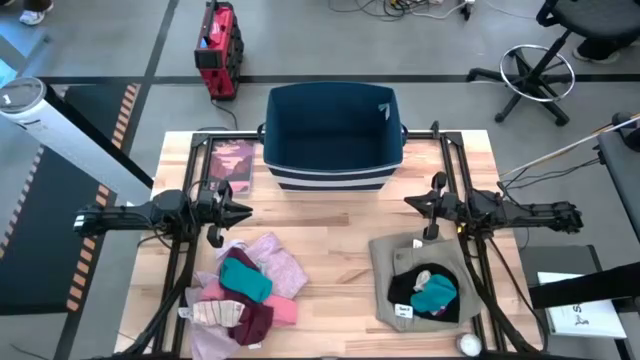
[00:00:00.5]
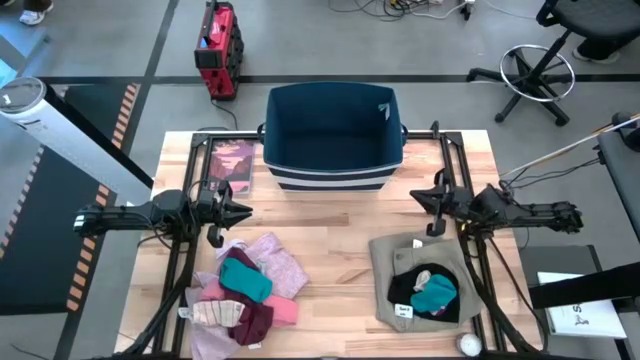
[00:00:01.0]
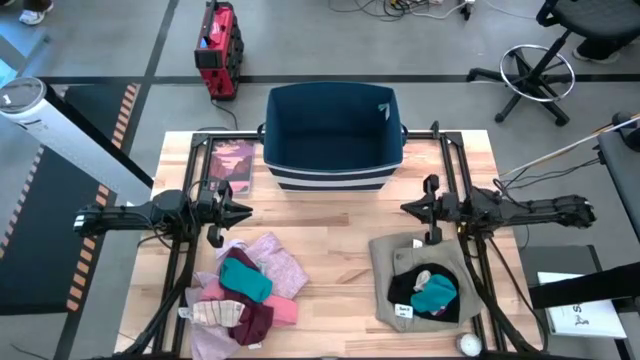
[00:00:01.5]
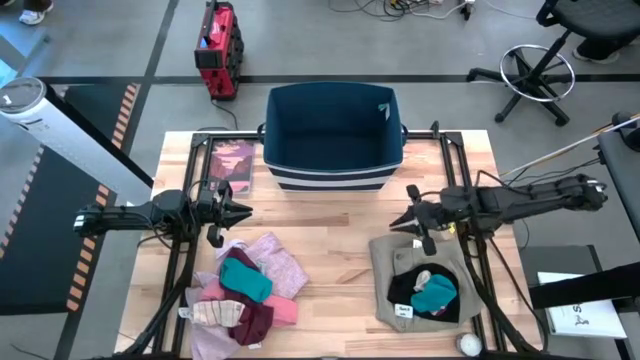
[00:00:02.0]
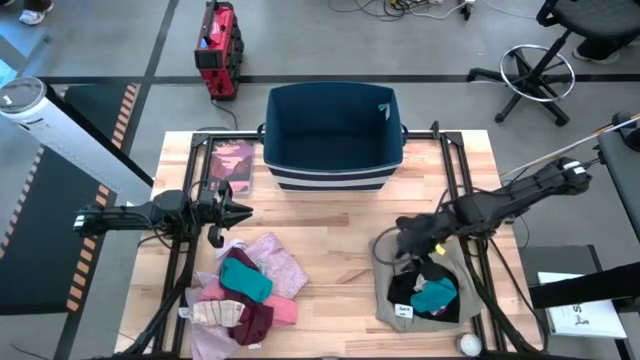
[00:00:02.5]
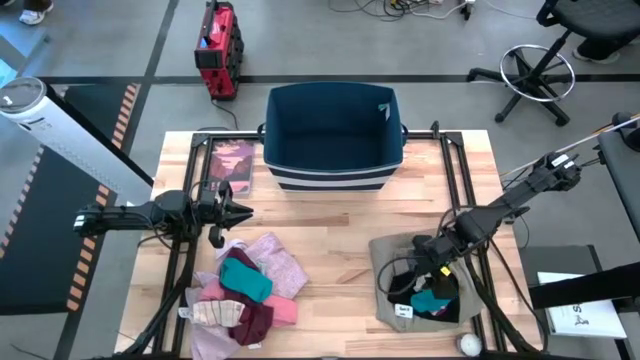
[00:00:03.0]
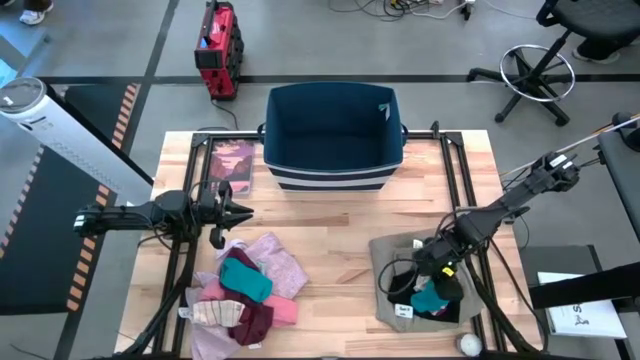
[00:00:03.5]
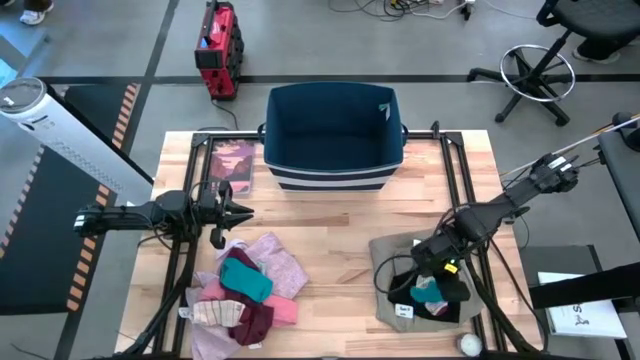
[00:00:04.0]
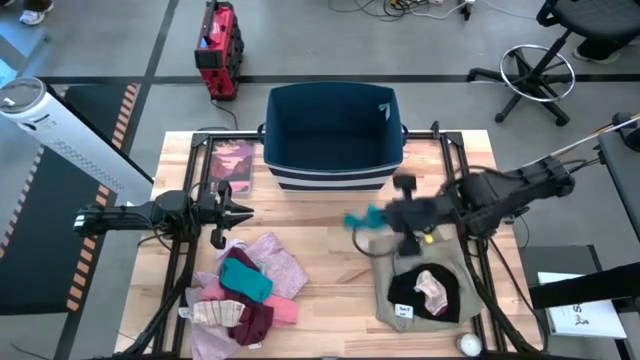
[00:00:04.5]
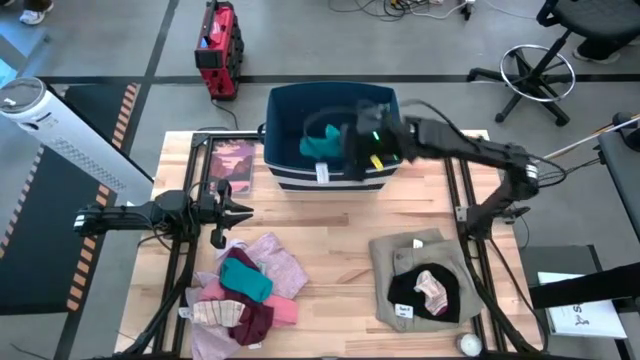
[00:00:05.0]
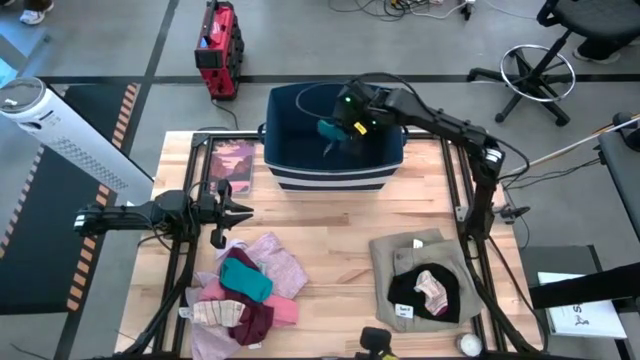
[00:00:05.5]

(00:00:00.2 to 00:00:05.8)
Task: Sort clothes
Put the right blue sock into the blue laundry bin

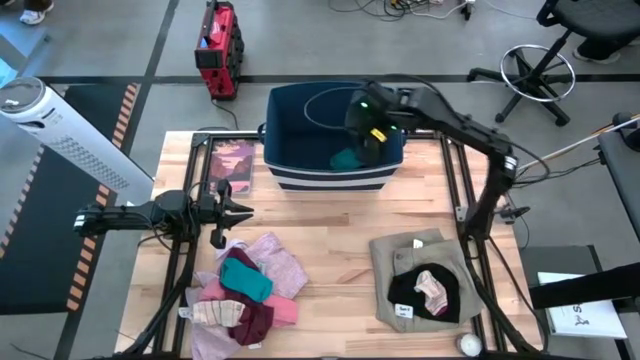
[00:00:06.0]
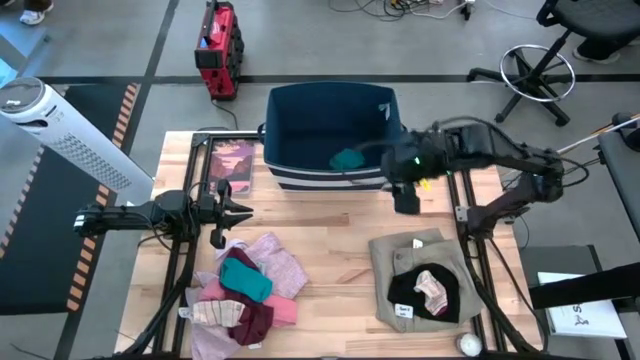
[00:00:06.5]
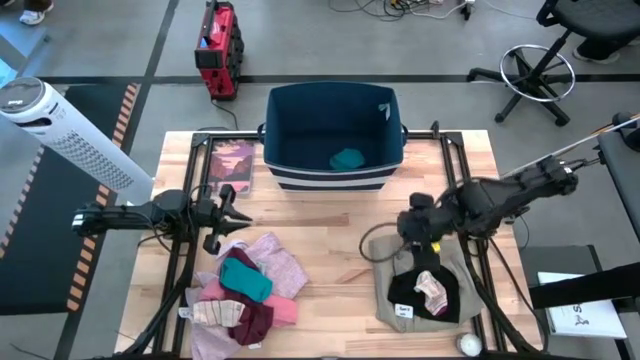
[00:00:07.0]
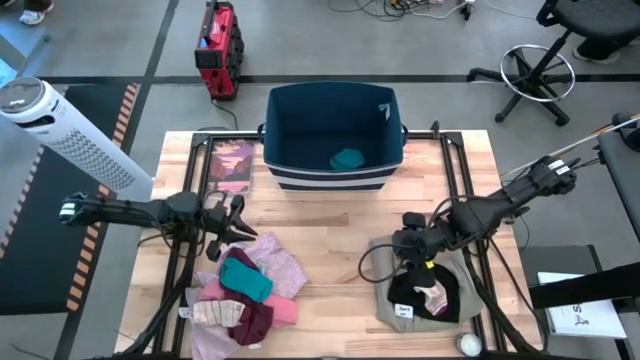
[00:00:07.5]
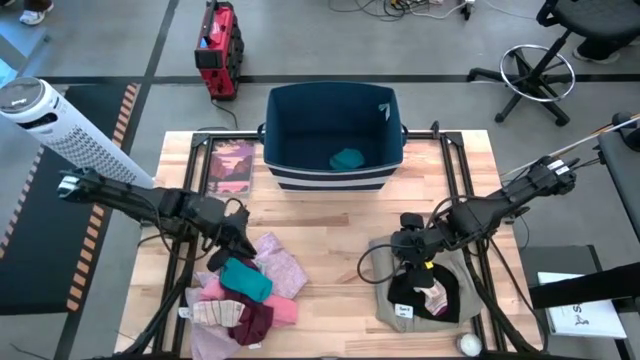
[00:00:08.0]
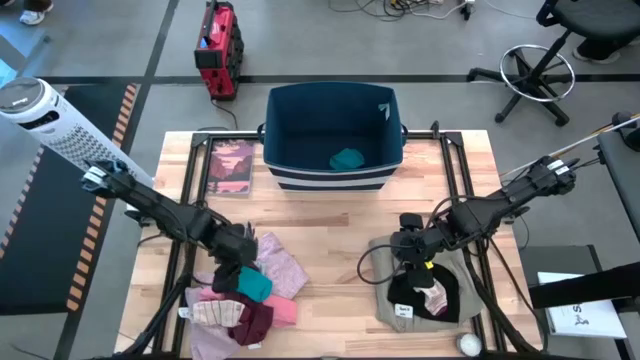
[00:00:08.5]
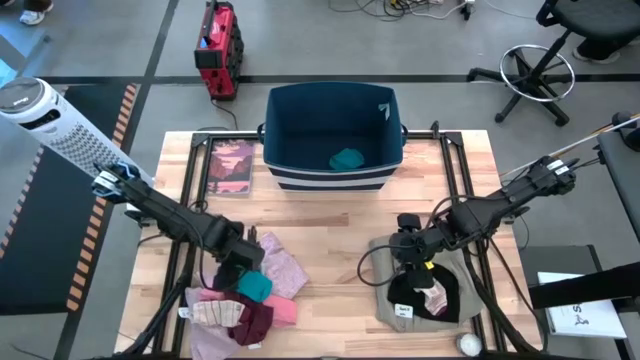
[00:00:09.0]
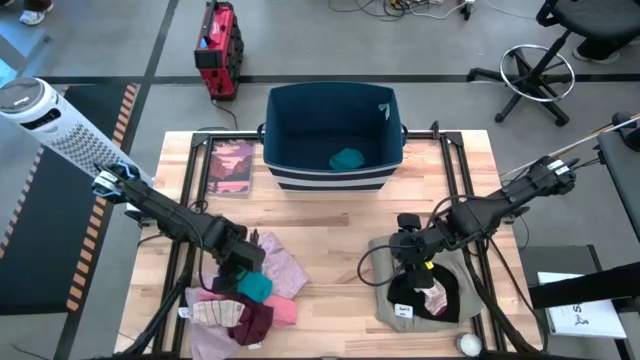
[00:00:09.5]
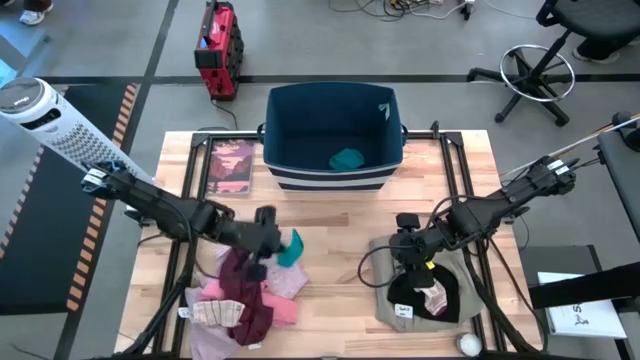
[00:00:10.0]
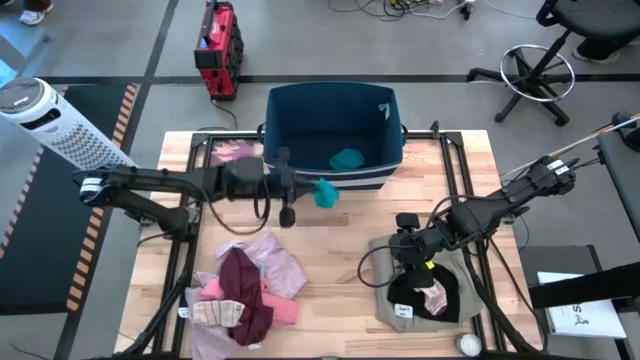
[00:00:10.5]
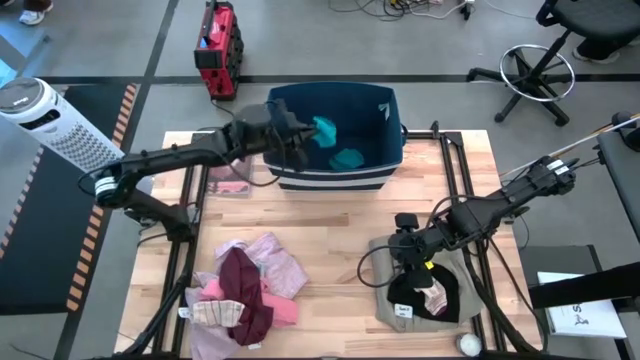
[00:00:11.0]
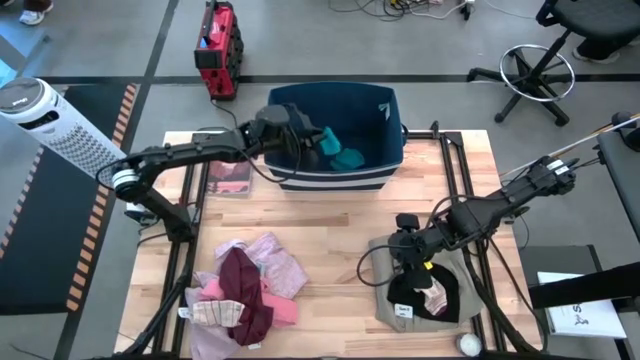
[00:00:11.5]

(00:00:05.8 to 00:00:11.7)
Put the blue sock into the blue laundry bin

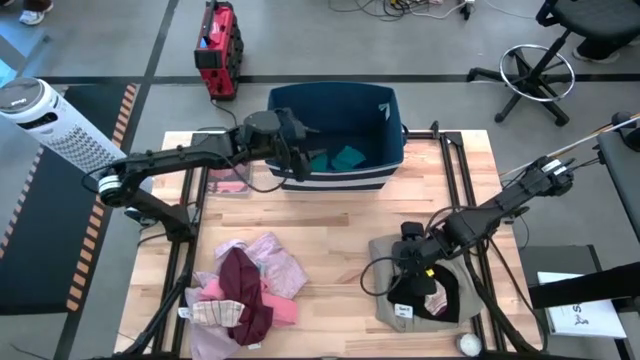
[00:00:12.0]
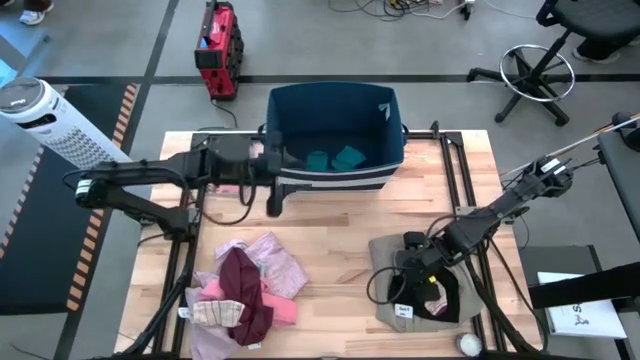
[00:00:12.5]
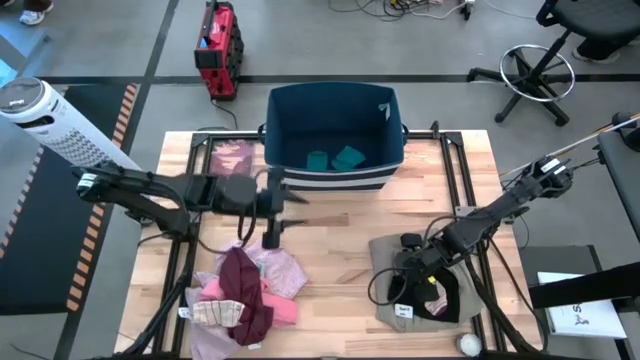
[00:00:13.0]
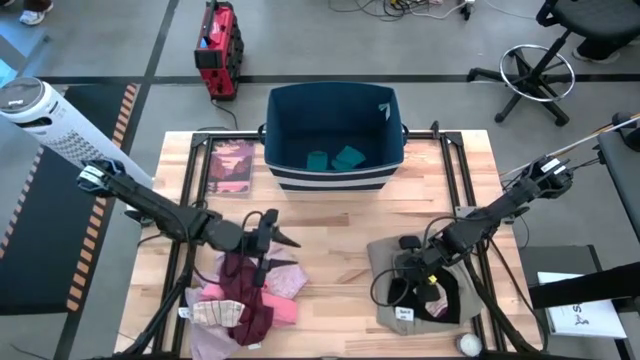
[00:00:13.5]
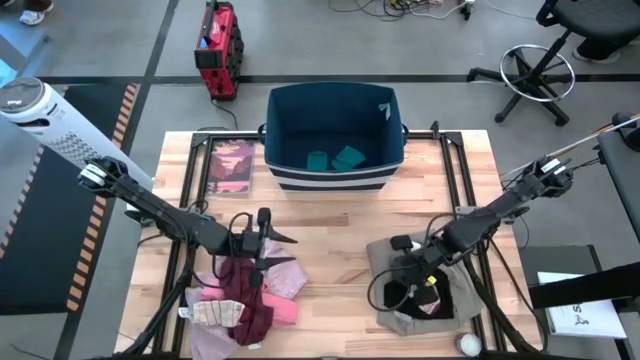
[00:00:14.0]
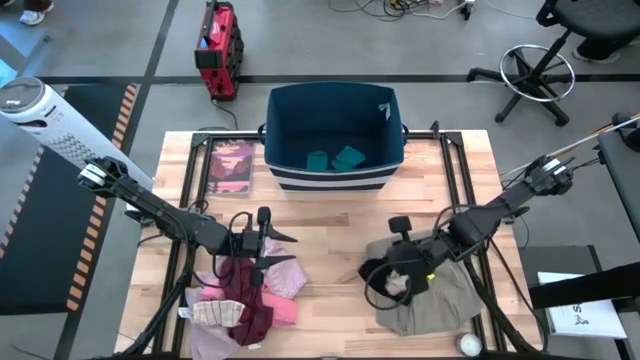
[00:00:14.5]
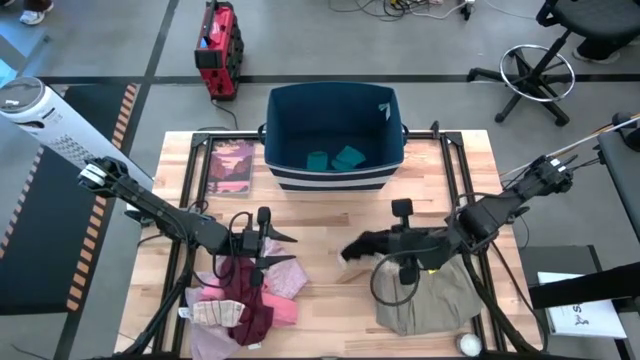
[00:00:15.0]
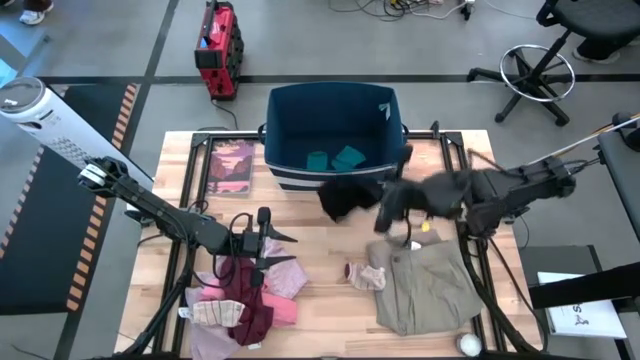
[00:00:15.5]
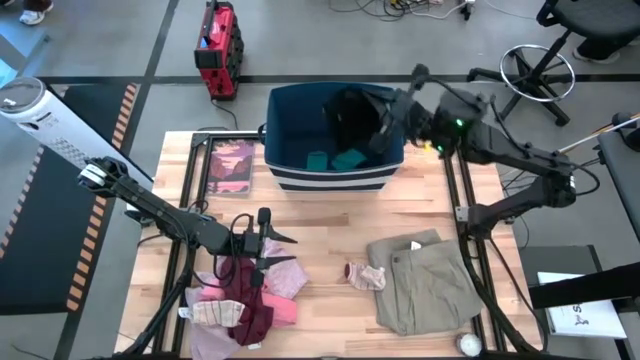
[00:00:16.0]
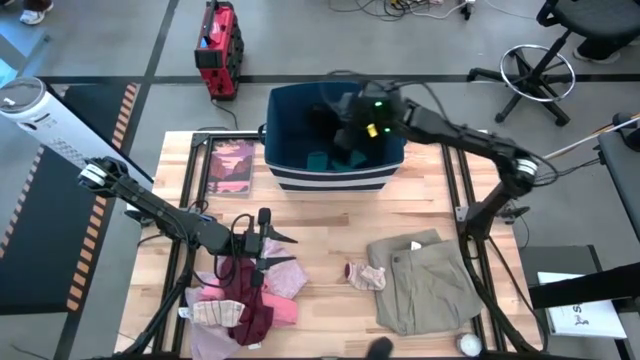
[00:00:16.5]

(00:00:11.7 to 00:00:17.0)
Put the black cycling short into the blue laundry bin

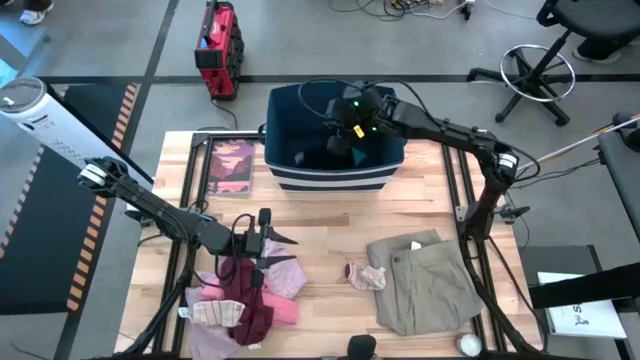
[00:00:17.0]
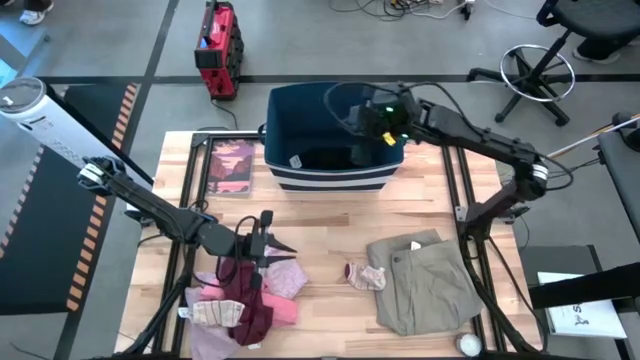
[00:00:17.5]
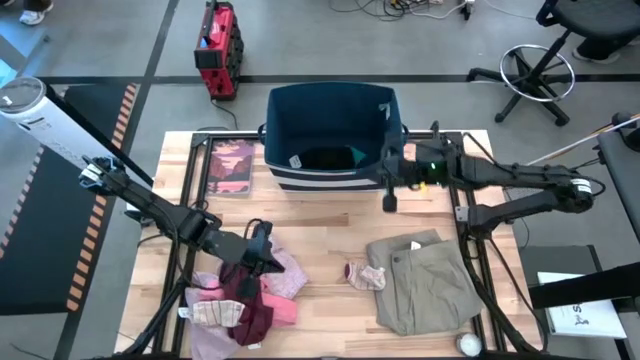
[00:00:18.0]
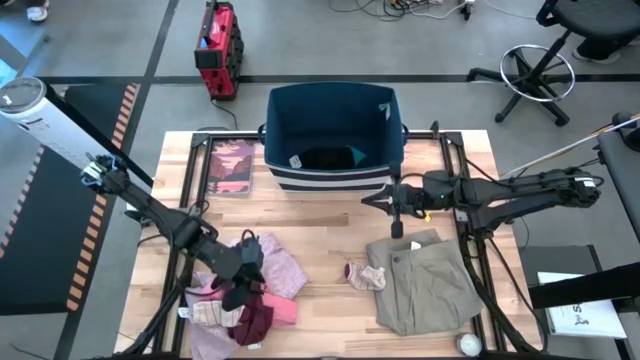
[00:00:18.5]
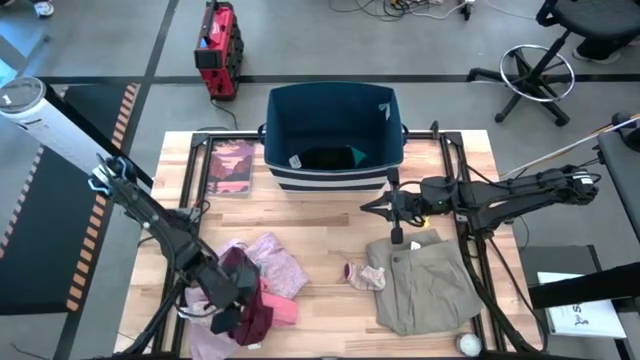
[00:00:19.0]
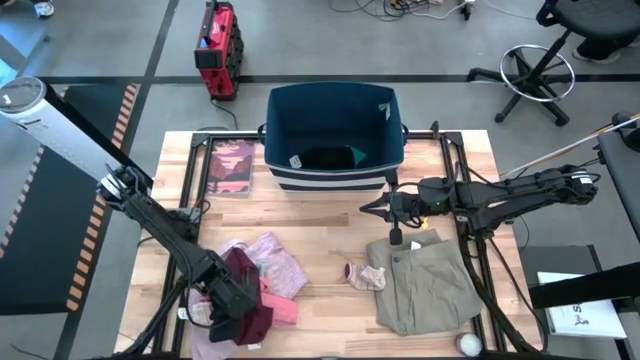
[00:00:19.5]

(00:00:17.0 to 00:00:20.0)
Put the light brown sock into the blue laundry bin

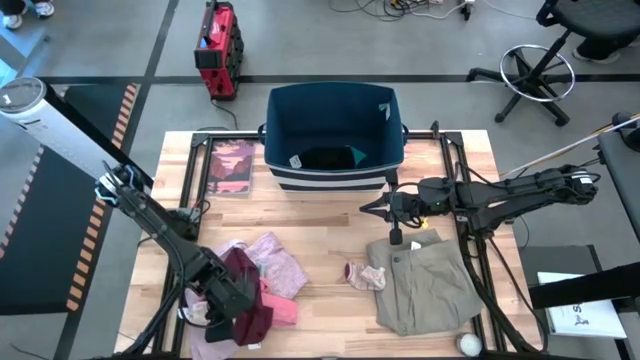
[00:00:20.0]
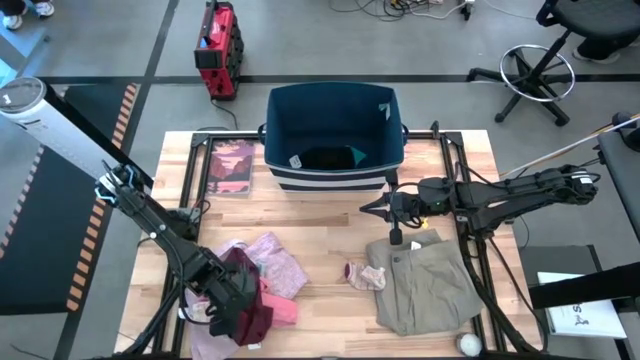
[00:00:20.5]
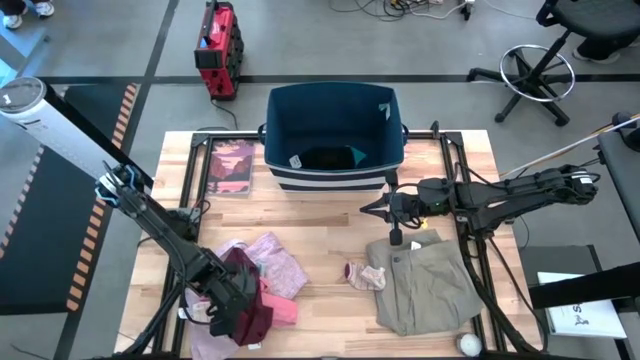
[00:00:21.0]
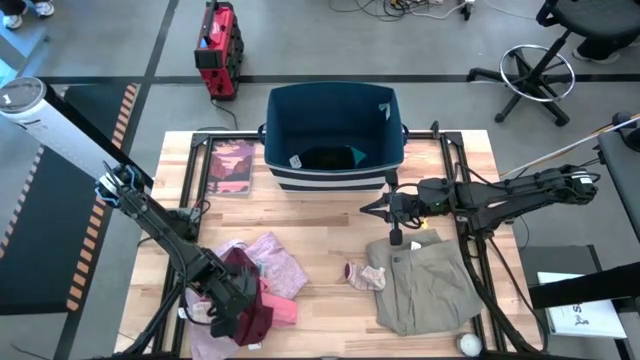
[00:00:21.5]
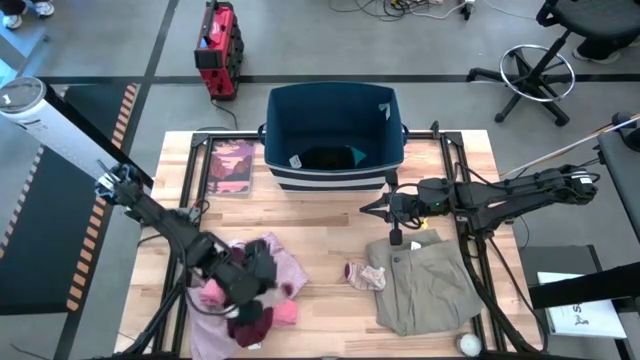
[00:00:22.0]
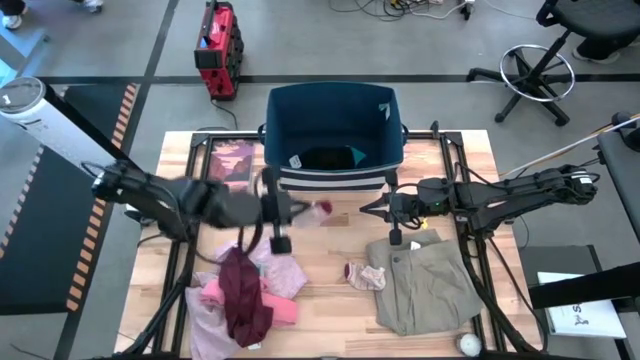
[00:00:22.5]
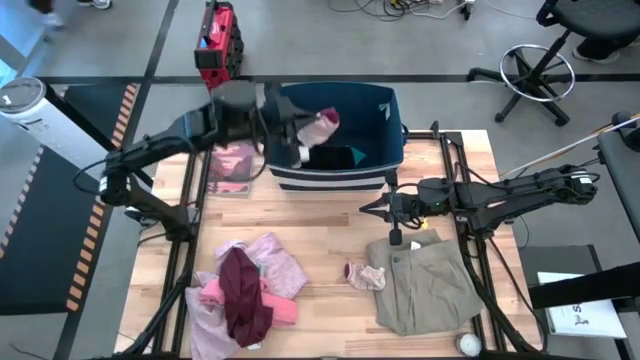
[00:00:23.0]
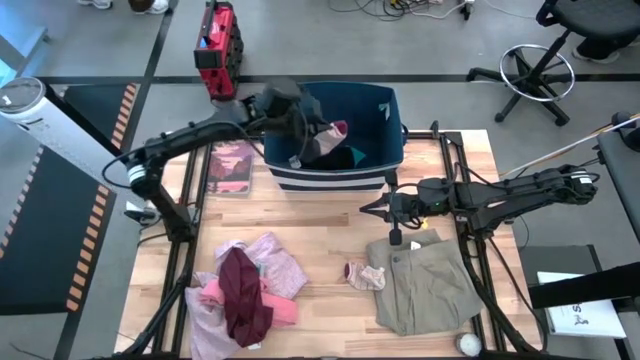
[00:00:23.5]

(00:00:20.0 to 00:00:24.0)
Put the light brown sock into the blue laundry bin
